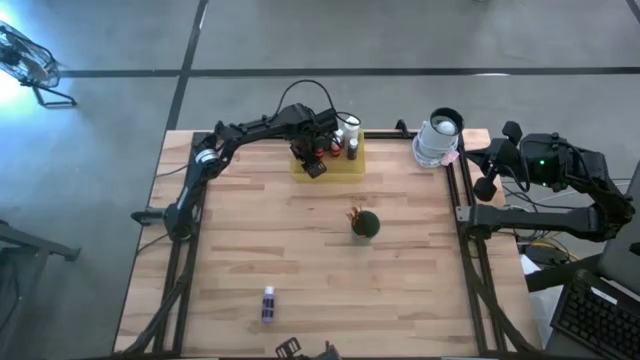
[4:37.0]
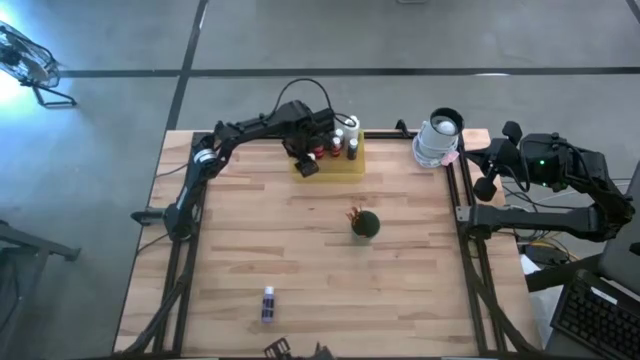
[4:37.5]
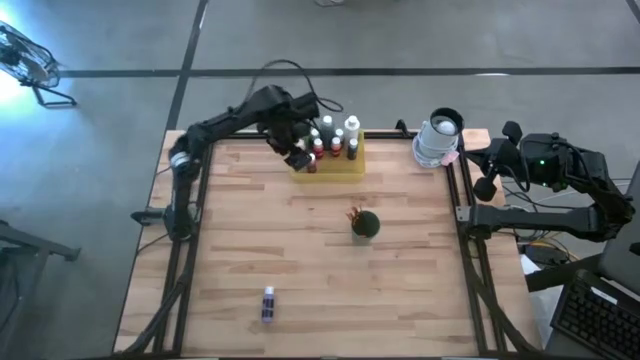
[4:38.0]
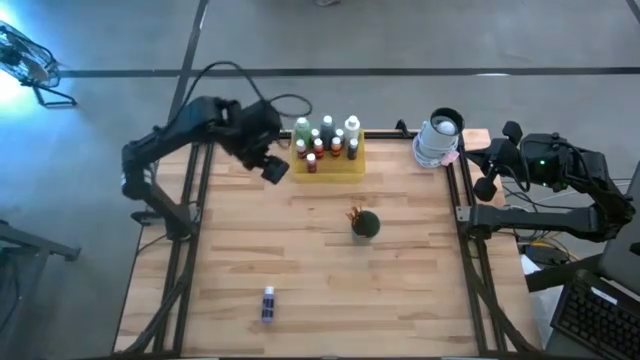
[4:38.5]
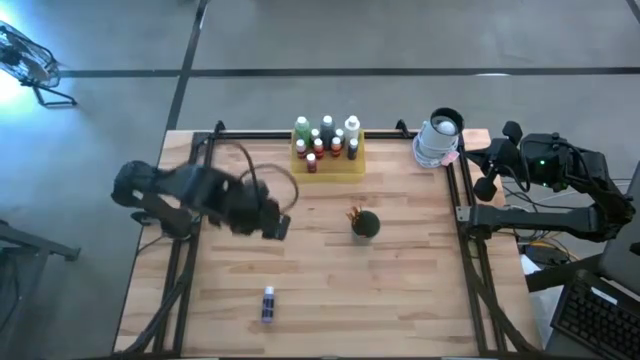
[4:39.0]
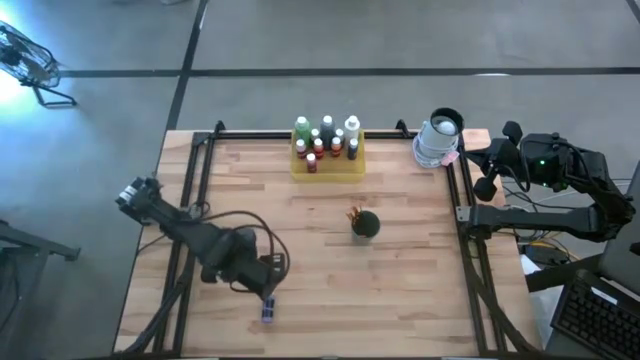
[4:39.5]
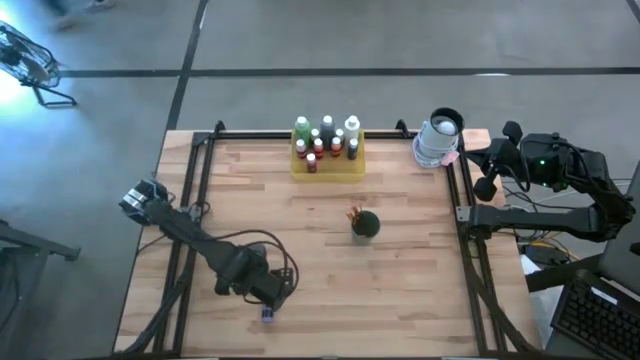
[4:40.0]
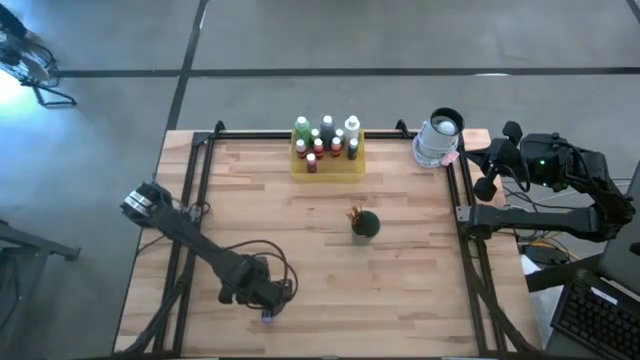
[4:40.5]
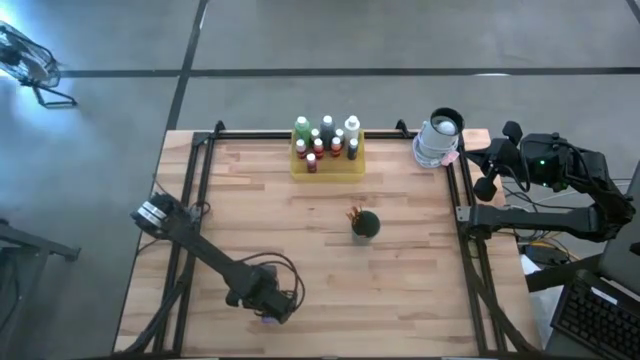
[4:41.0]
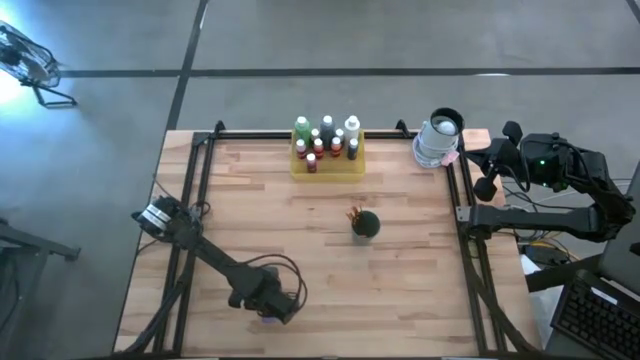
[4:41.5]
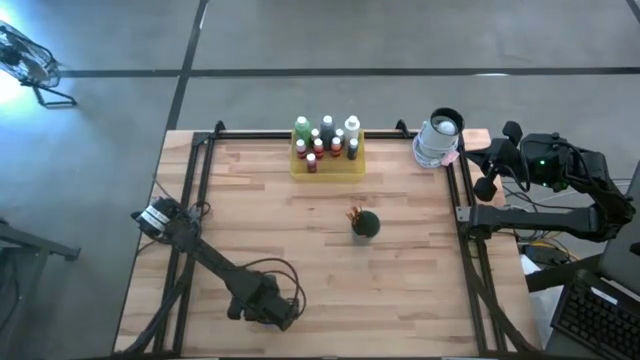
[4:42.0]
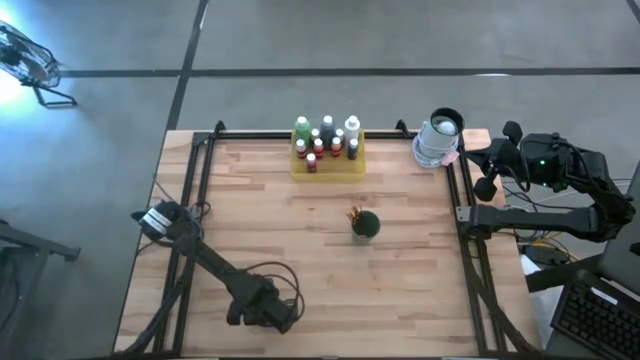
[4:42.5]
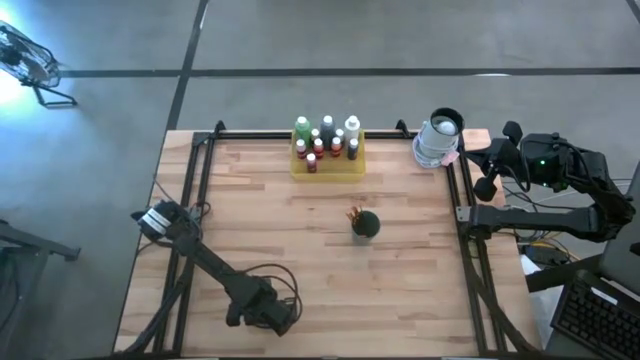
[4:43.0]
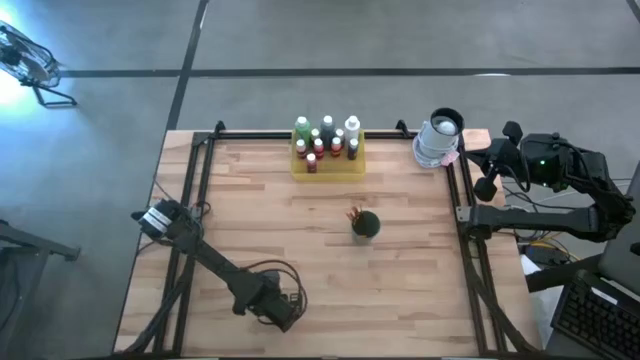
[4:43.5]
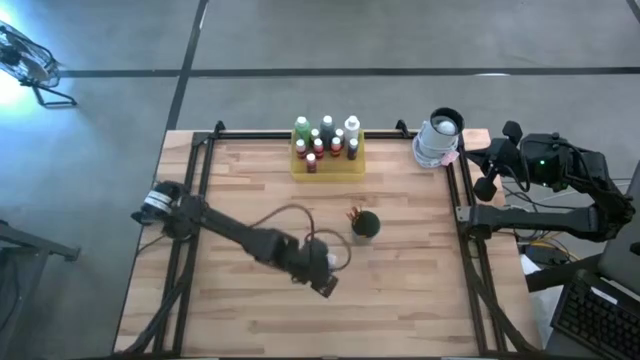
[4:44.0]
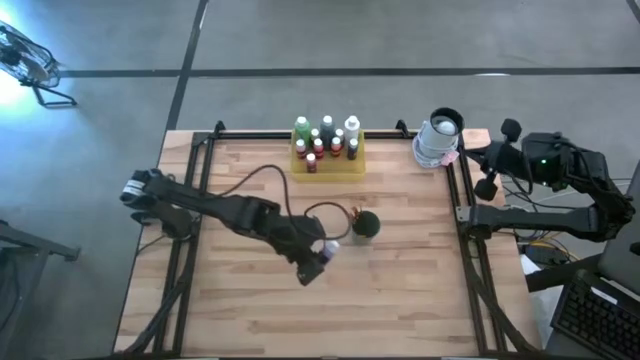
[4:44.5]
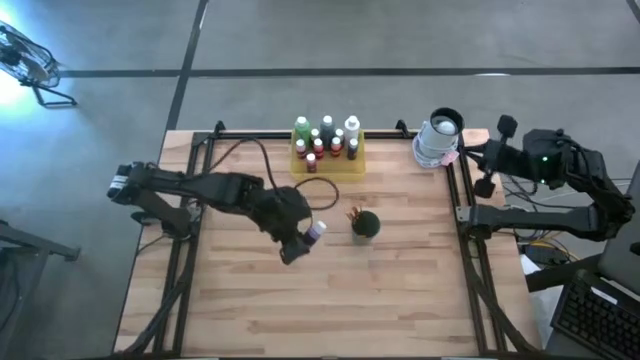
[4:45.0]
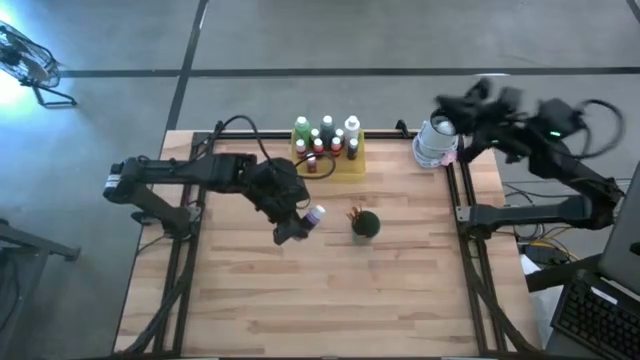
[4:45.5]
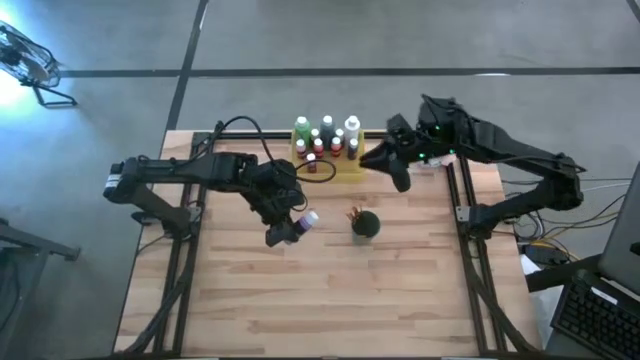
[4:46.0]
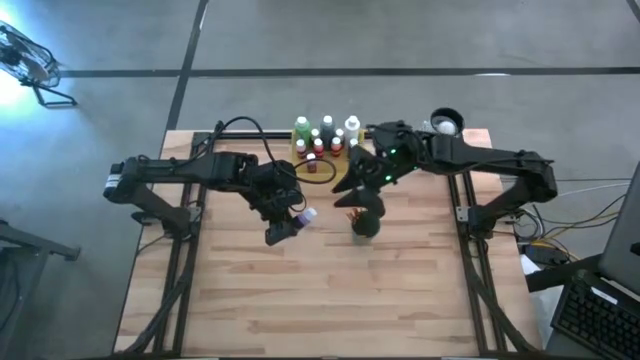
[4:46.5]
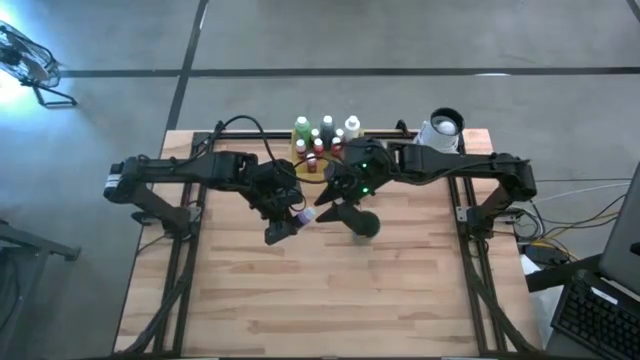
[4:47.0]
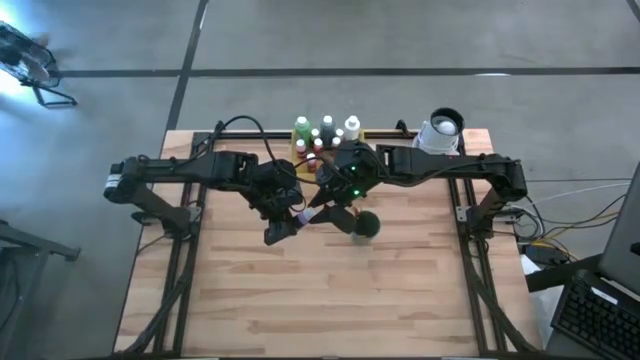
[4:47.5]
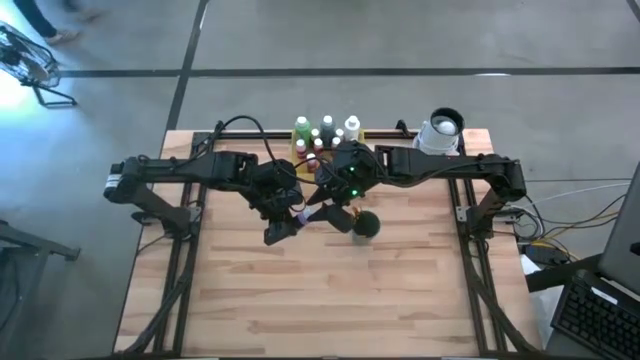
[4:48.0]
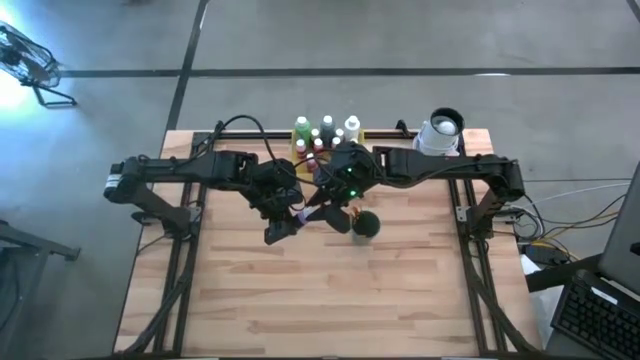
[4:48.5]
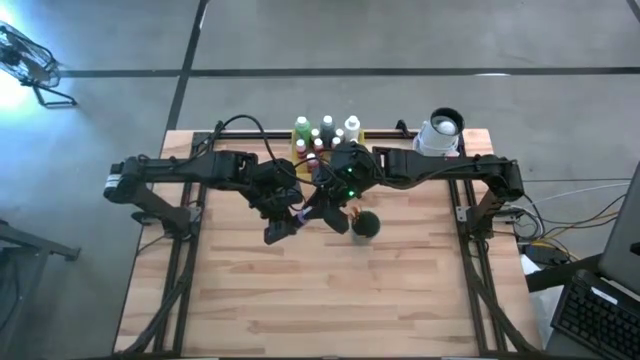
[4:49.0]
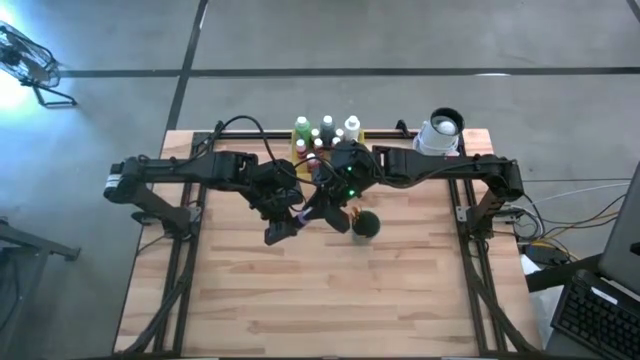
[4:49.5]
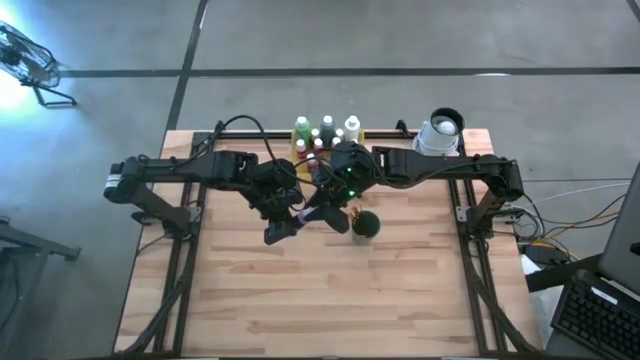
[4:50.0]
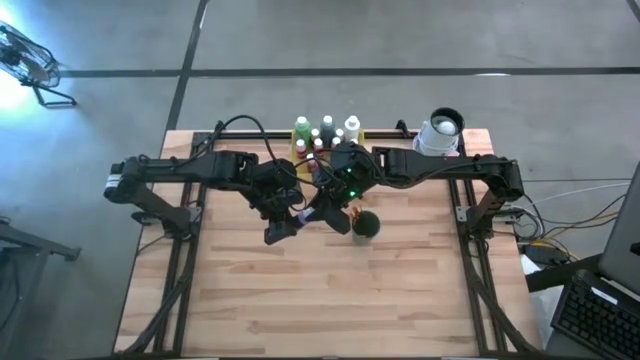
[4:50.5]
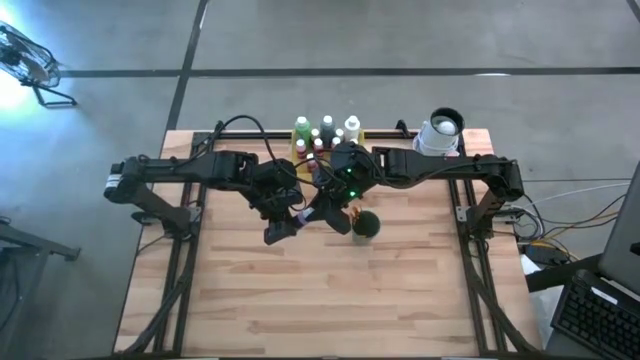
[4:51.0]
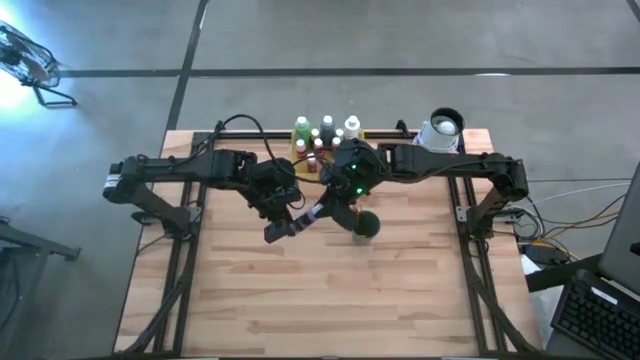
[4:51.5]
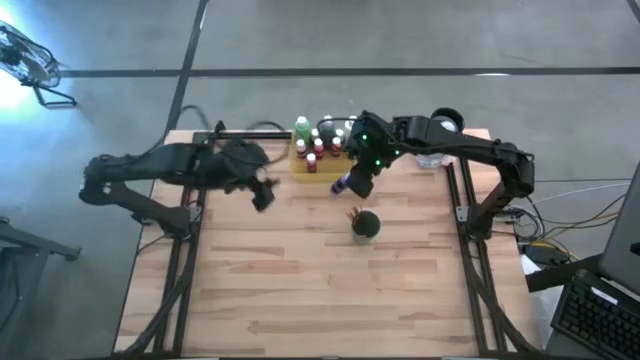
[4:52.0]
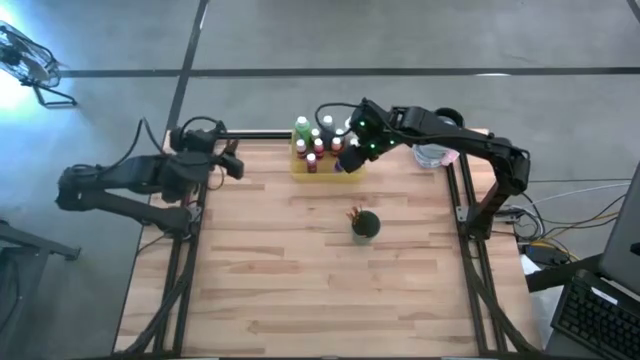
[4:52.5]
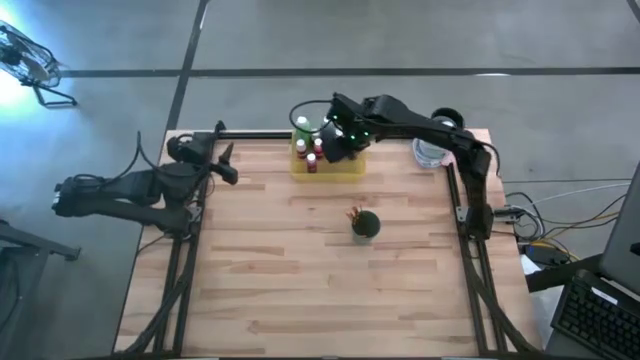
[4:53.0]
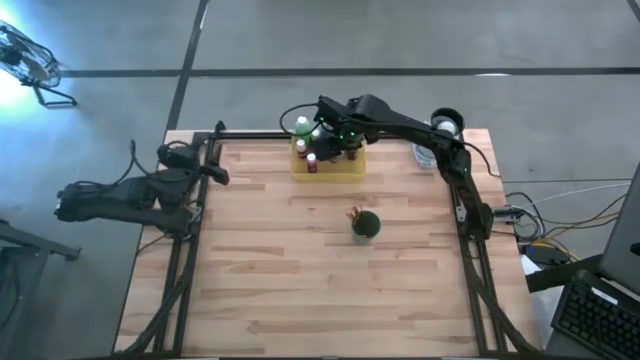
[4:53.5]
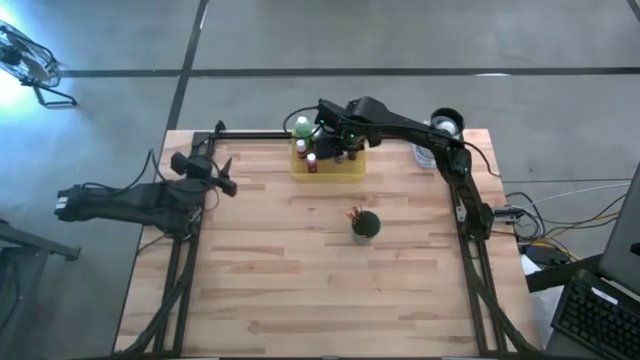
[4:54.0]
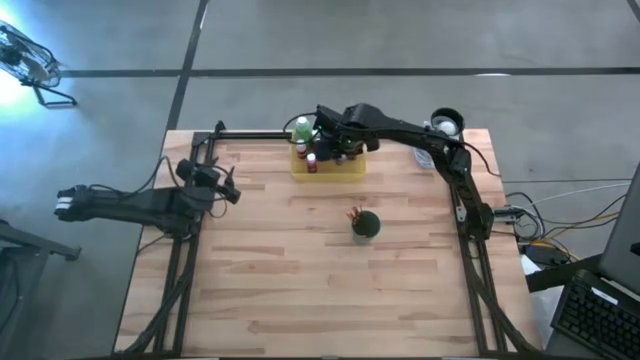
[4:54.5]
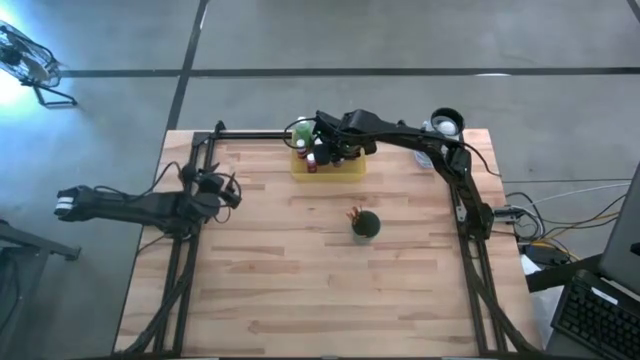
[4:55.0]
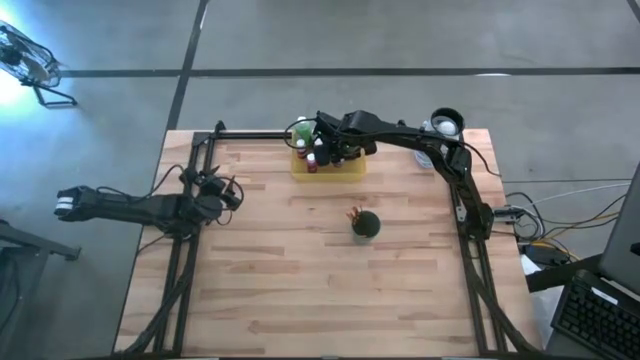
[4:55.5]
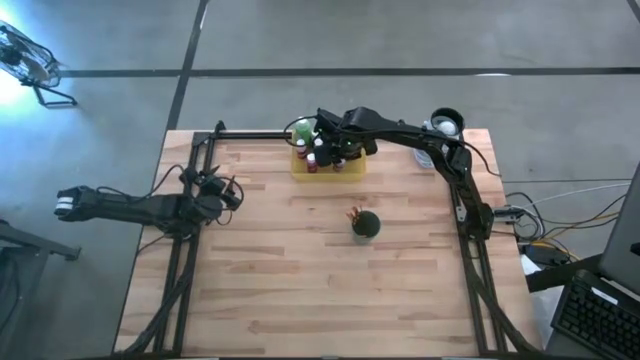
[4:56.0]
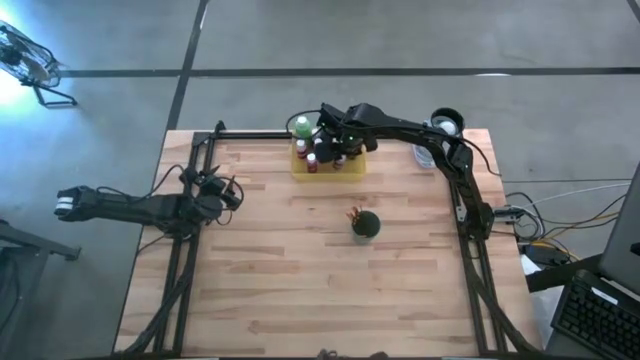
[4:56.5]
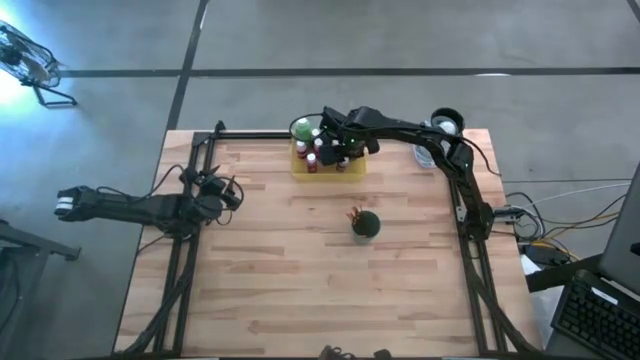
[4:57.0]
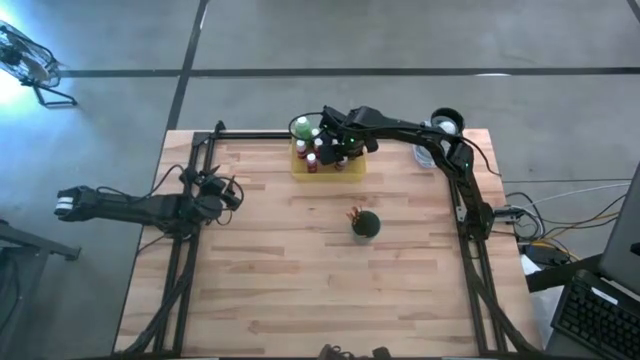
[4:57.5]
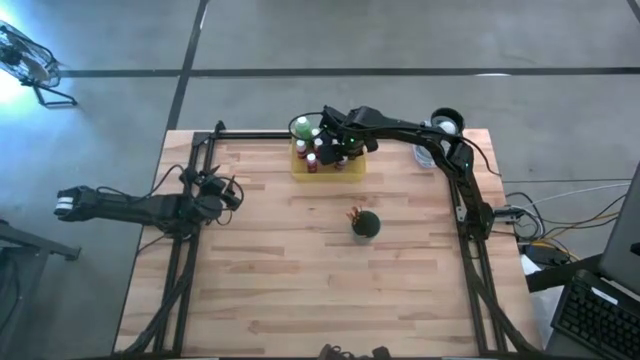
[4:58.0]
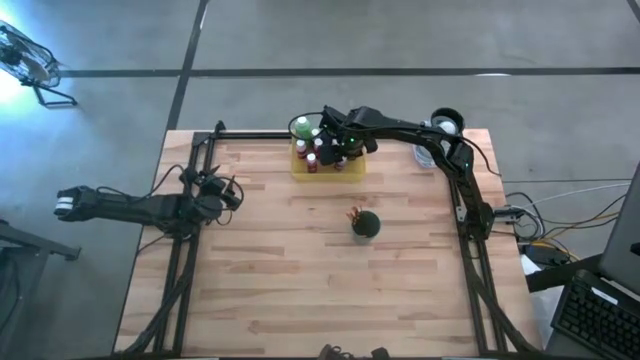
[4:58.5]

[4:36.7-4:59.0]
Task: Pick & Place Paint Supplies
Put the purple paint bottle into the yellow bin
